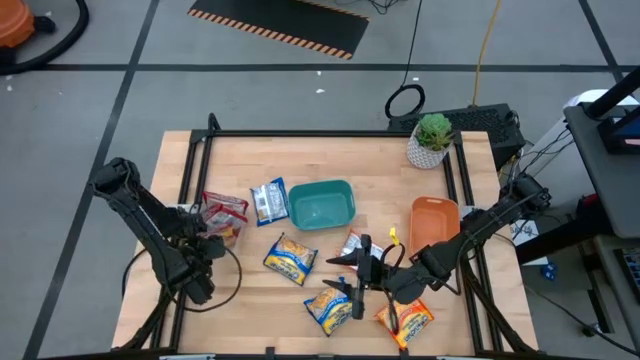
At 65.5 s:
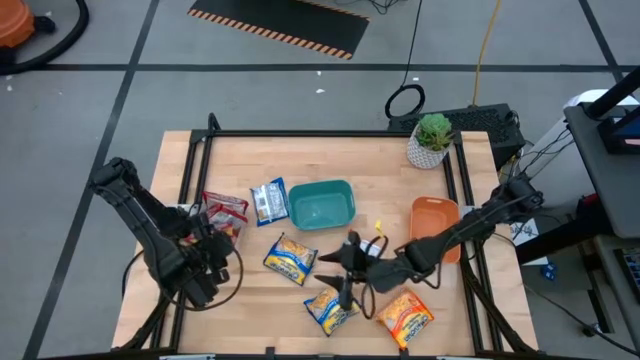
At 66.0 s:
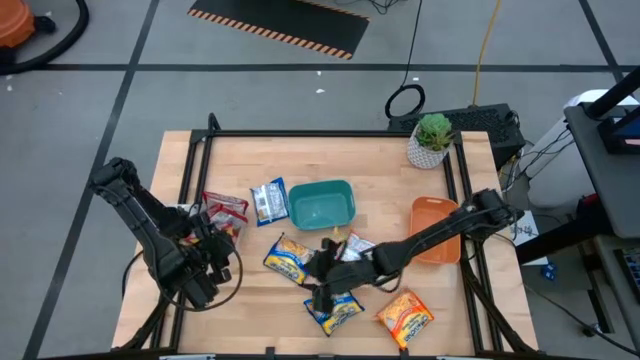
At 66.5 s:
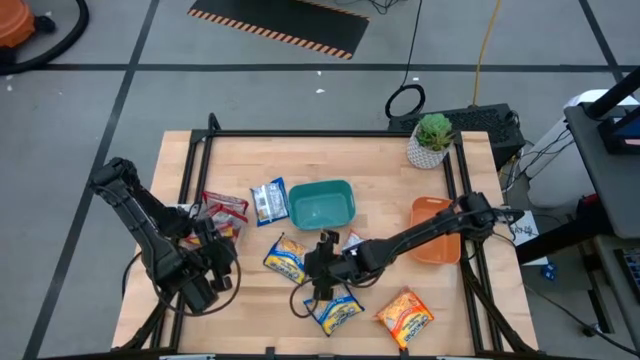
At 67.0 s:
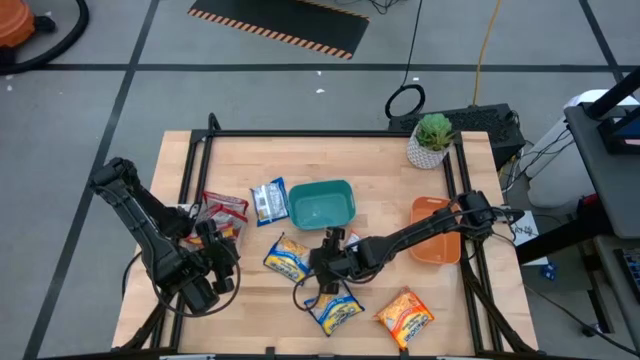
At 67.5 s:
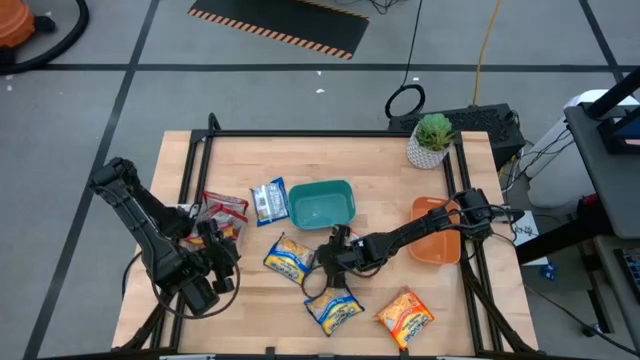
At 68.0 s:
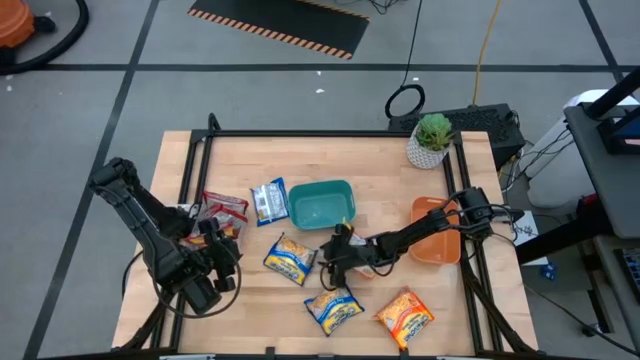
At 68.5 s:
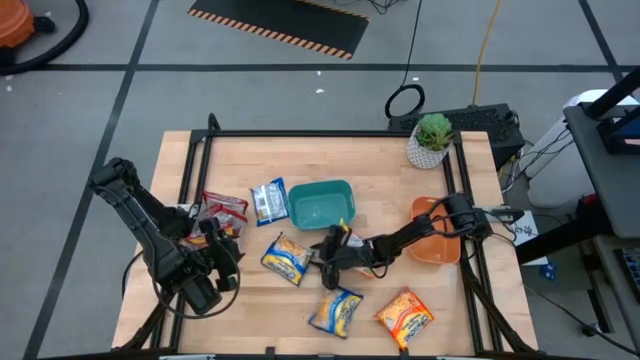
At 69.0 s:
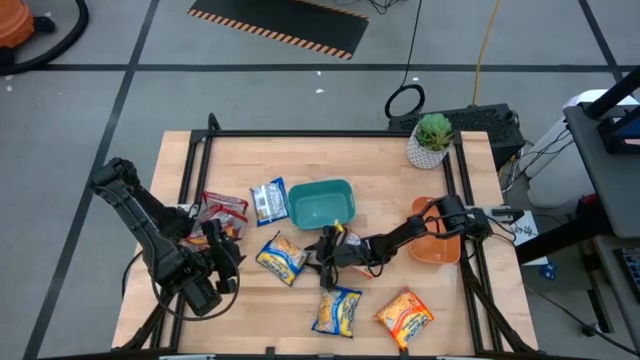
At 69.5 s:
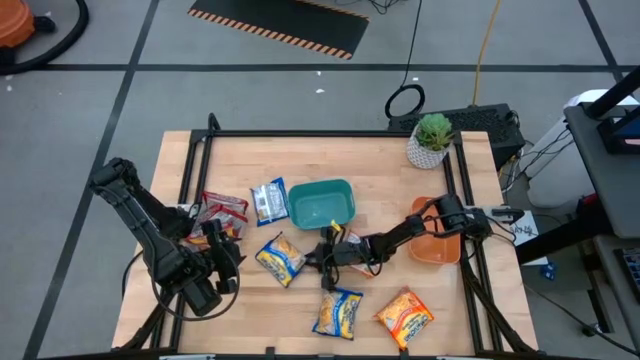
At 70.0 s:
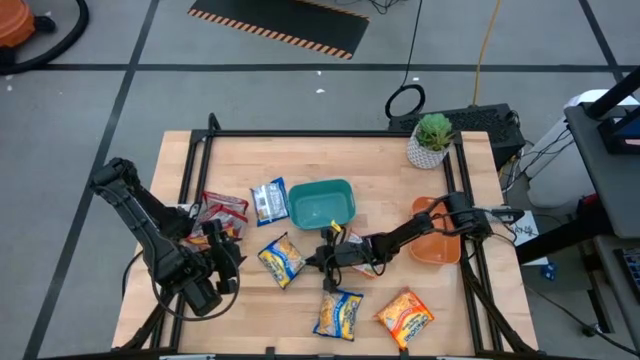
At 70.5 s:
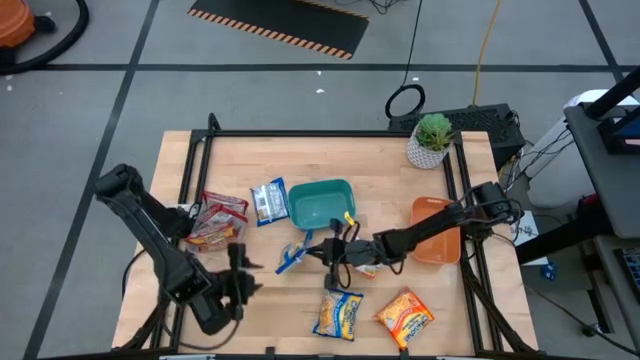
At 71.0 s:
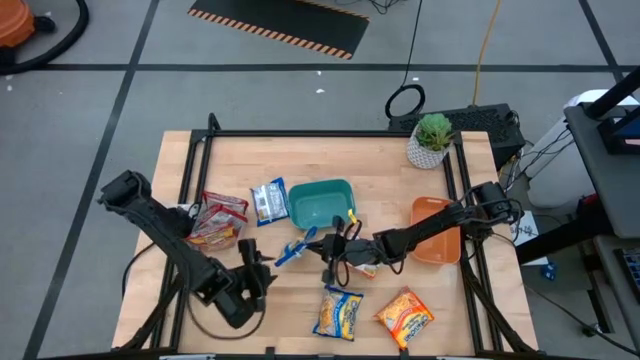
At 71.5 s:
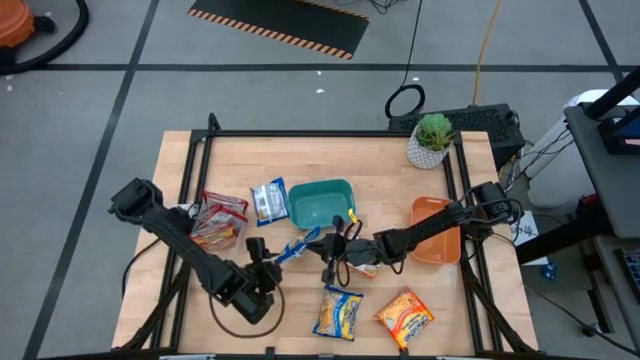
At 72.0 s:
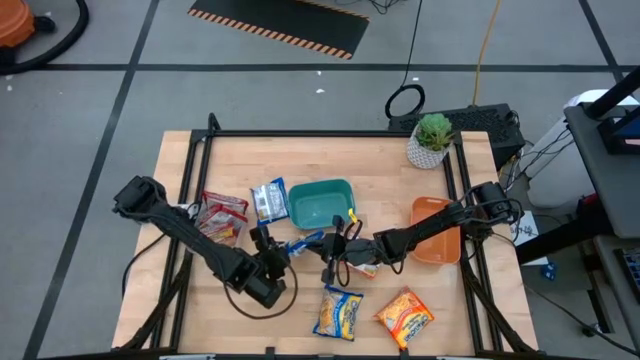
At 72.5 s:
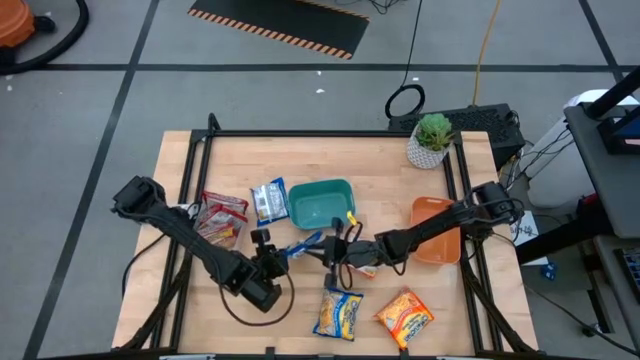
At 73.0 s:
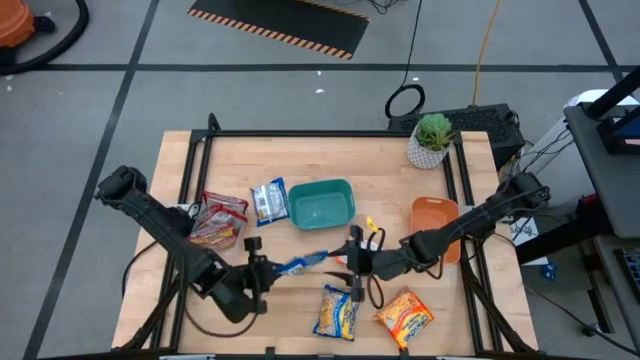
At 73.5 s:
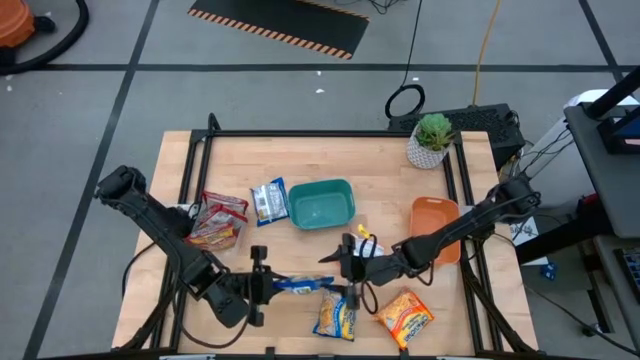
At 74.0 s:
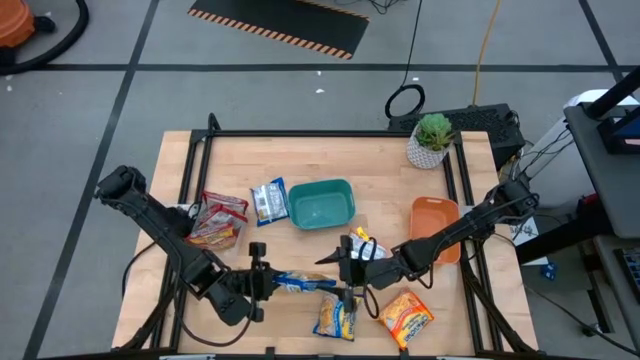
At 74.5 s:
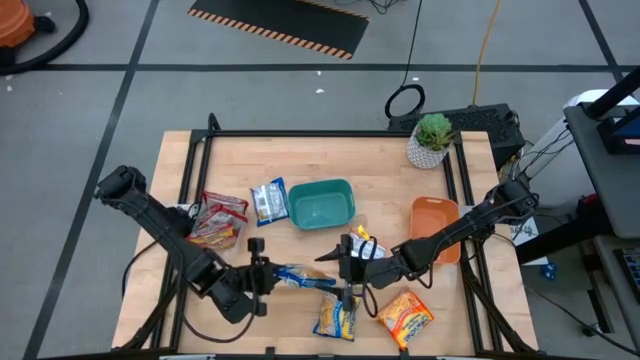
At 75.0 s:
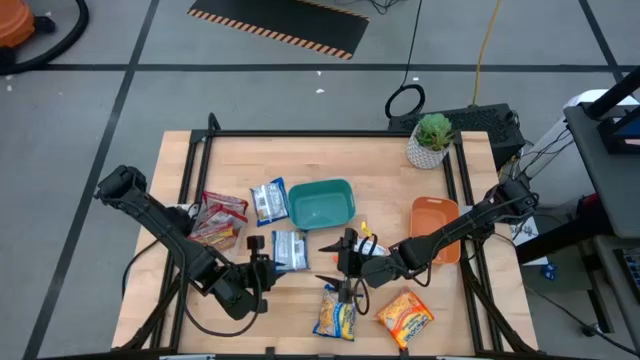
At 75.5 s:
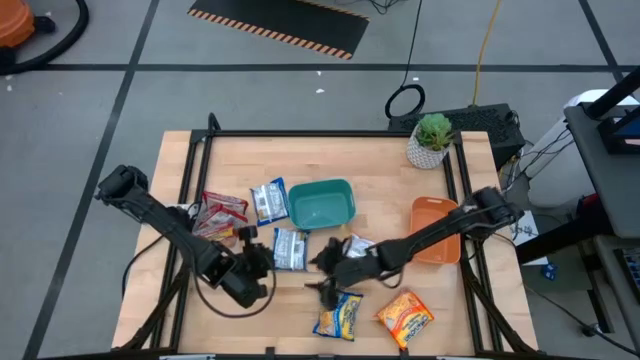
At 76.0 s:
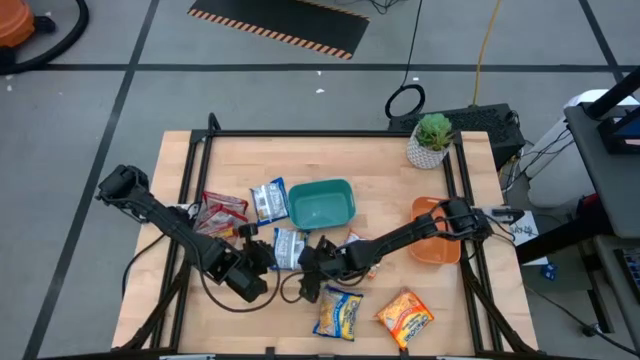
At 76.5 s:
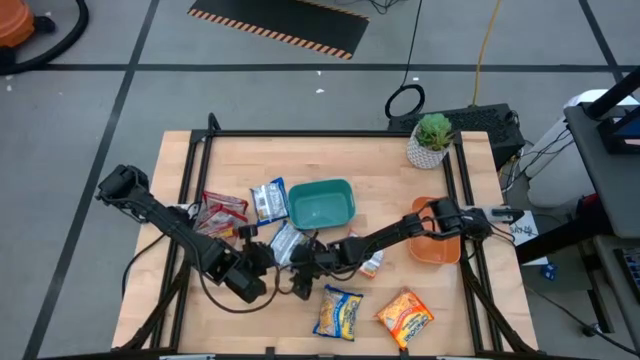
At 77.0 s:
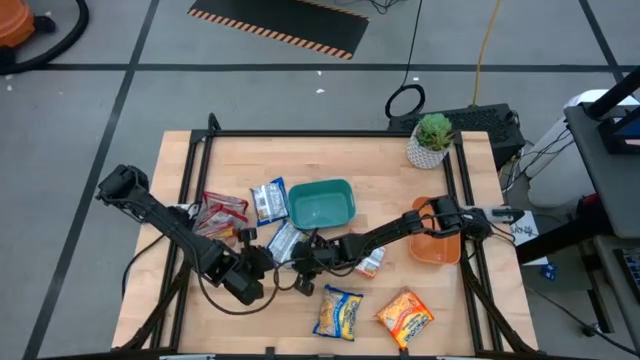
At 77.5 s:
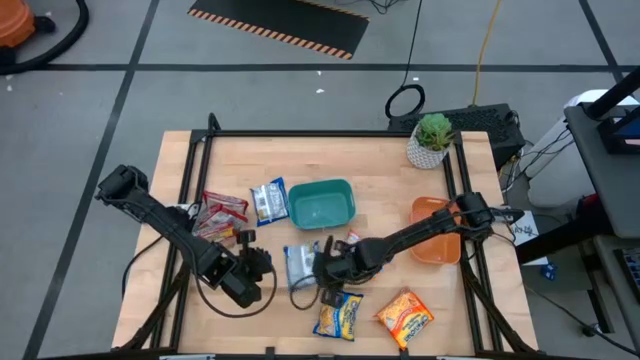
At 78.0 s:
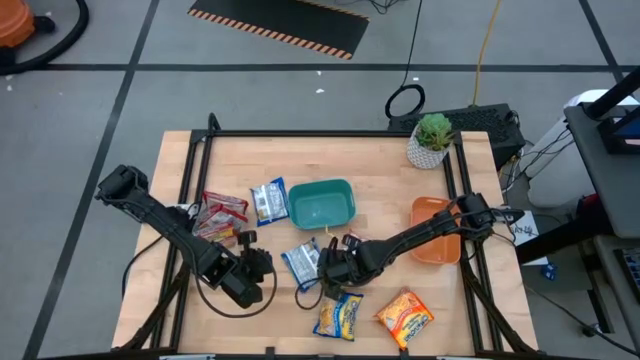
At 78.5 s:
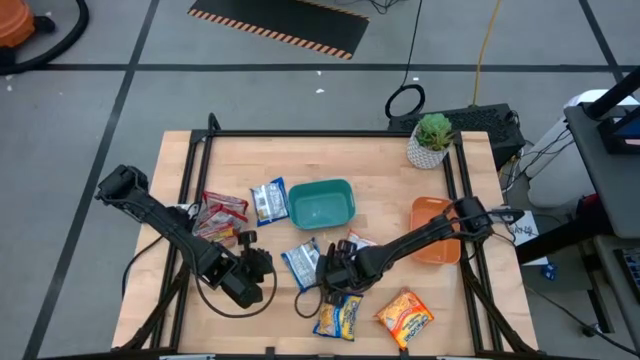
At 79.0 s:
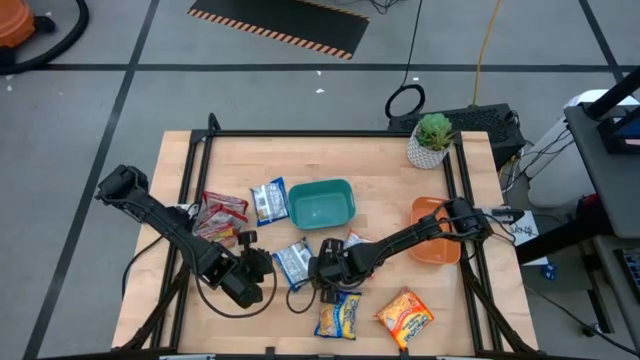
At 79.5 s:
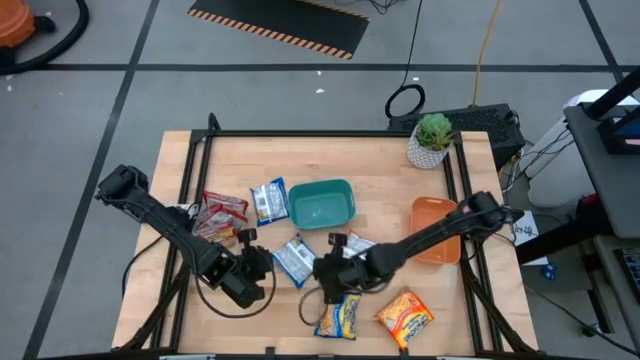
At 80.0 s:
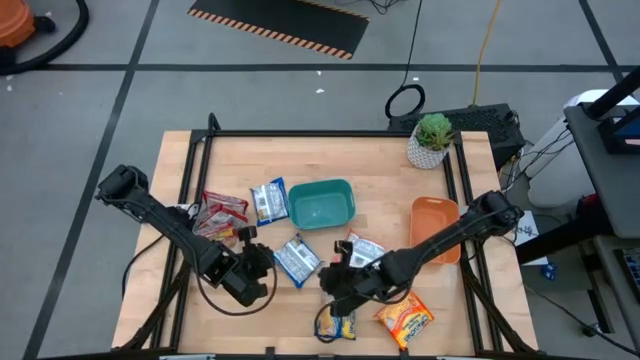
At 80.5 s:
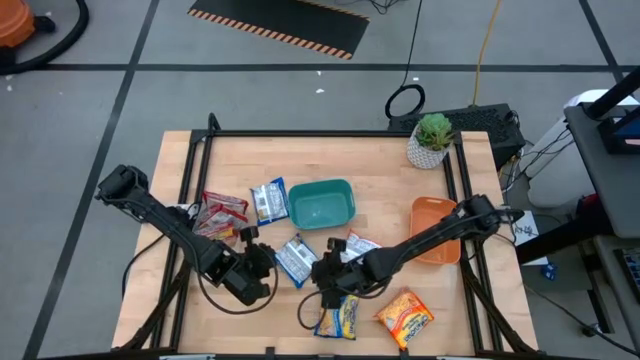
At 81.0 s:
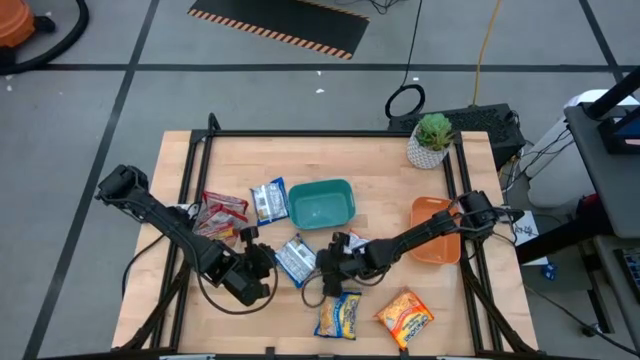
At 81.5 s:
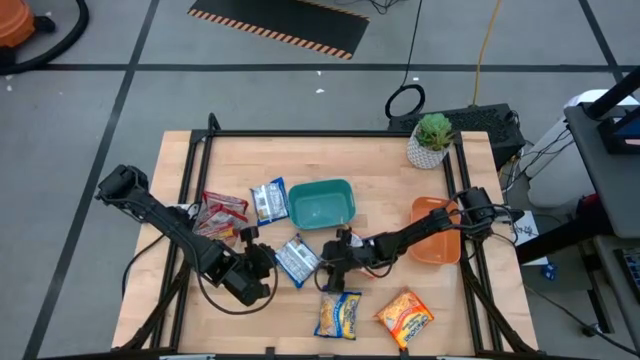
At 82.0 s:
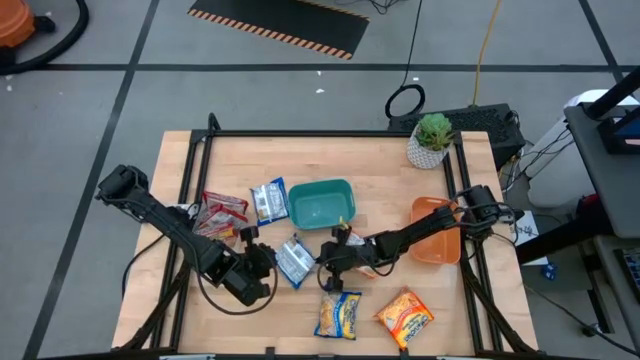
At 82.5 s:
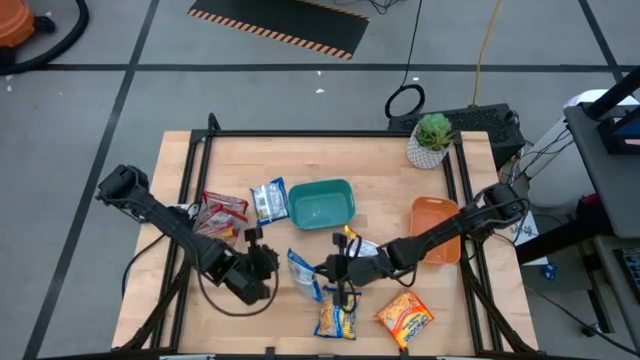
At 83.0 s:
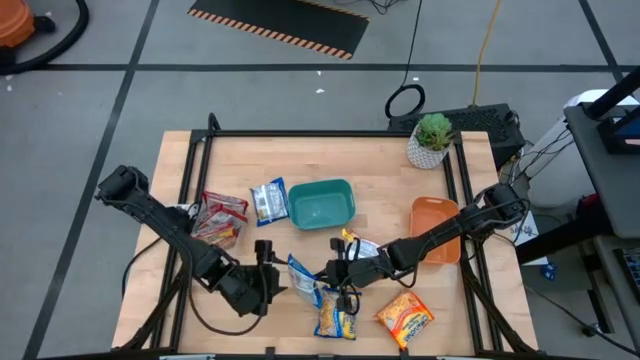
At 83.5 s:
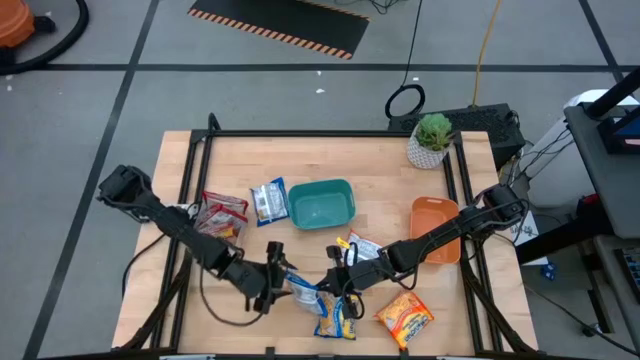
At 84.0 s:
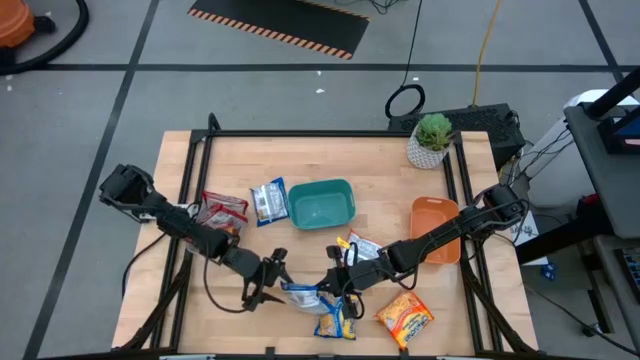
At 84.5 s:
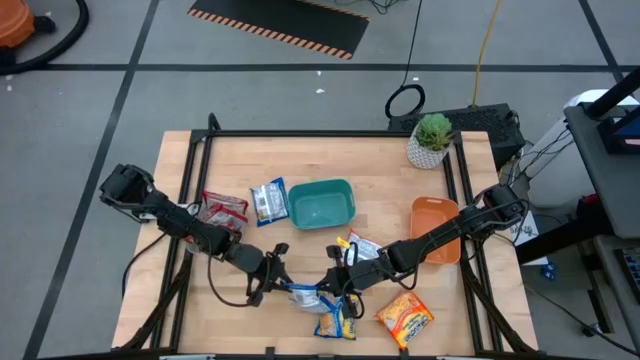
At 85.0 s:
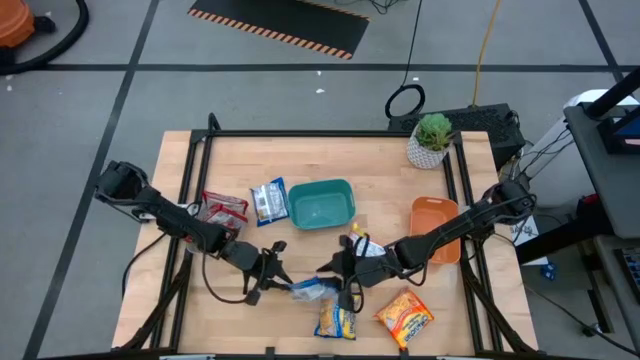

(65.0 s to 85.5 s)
Task: Sort Maruchan noodles
Put the middle blue noodle pack into the orange bin
